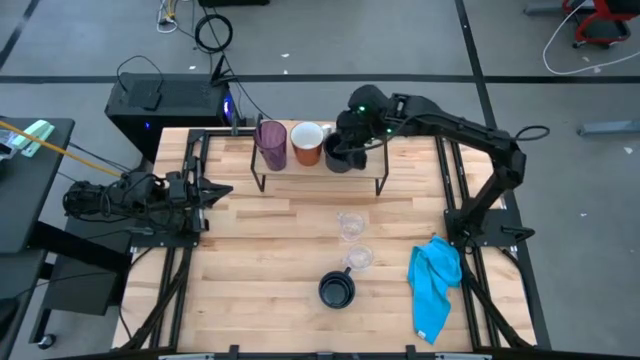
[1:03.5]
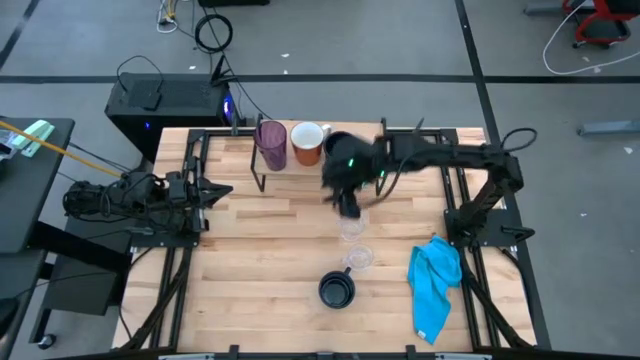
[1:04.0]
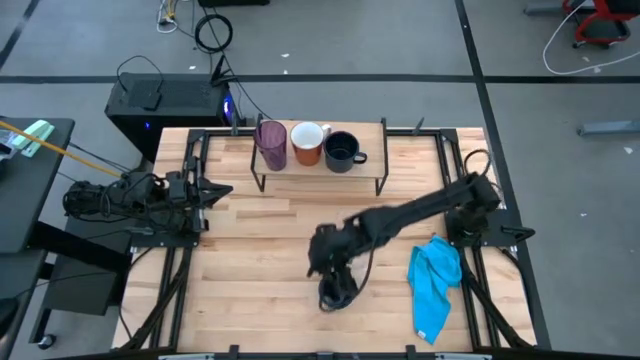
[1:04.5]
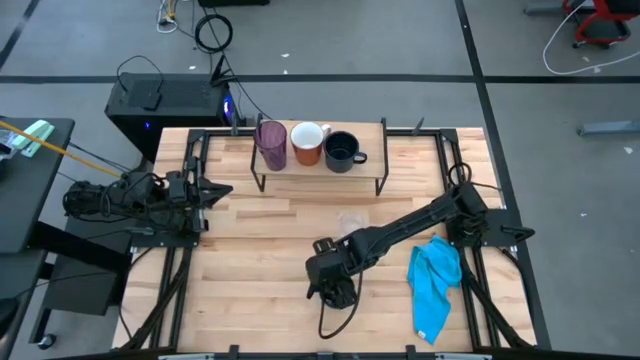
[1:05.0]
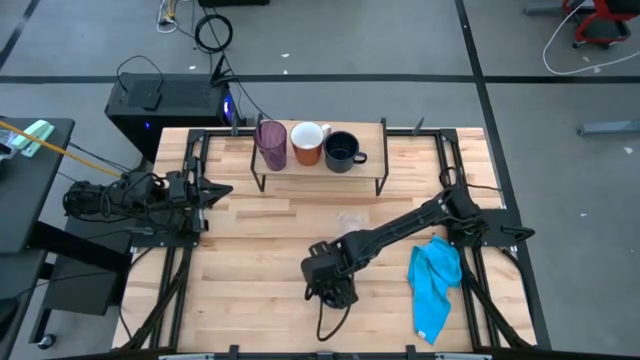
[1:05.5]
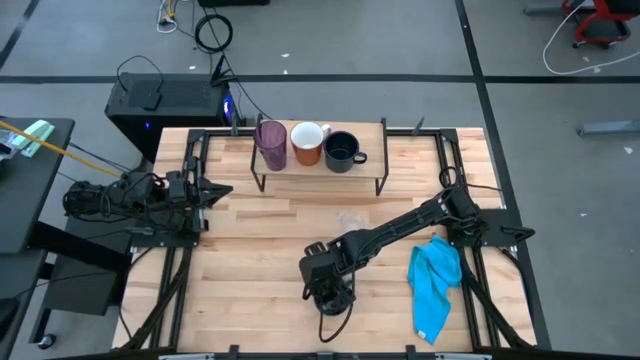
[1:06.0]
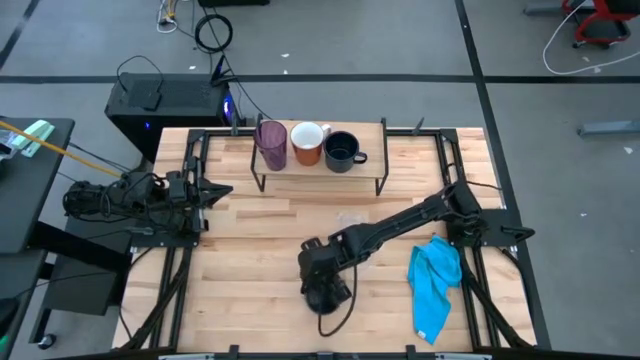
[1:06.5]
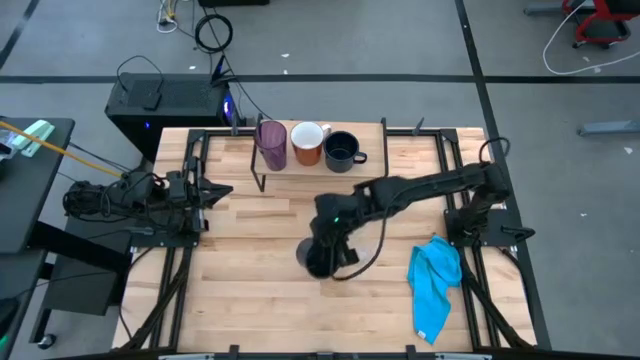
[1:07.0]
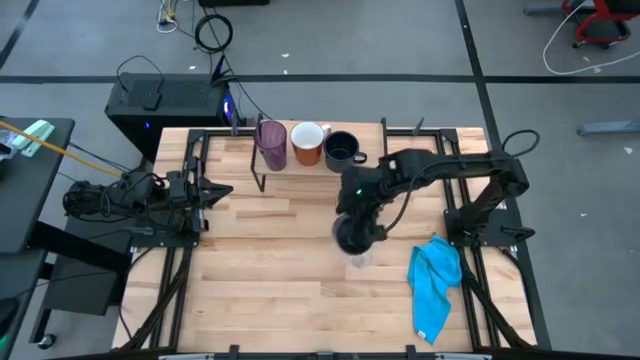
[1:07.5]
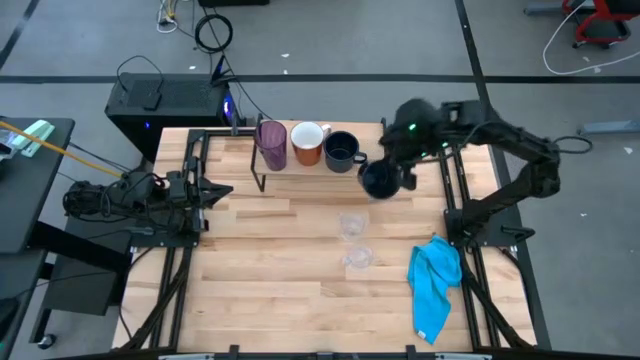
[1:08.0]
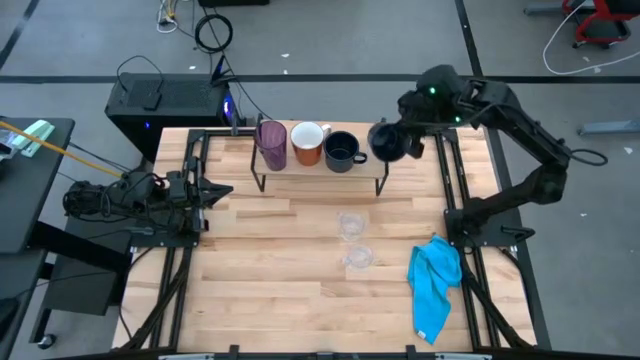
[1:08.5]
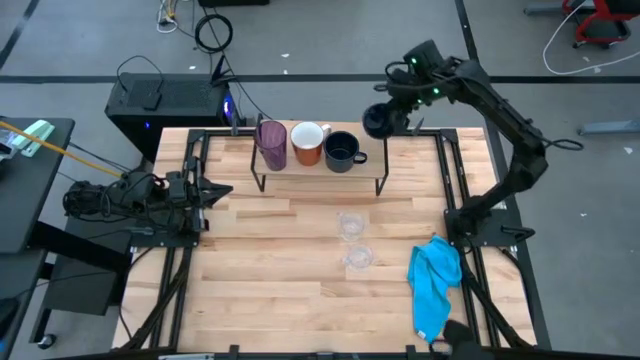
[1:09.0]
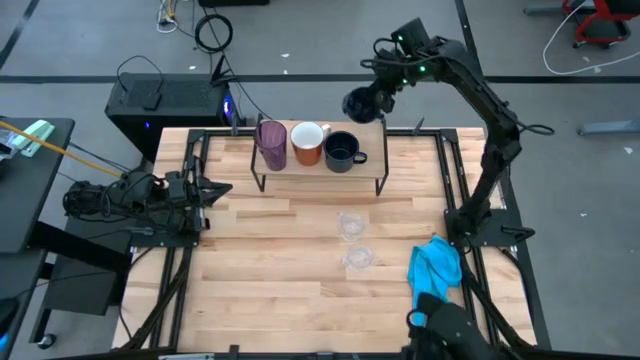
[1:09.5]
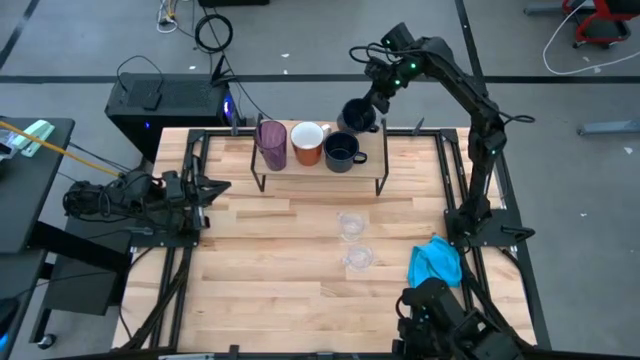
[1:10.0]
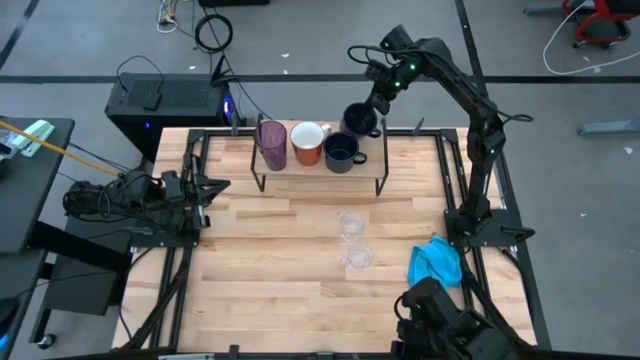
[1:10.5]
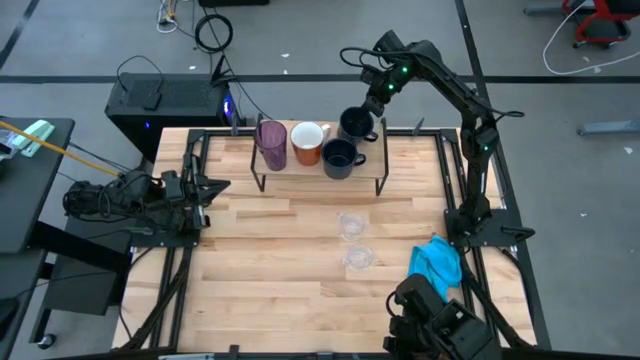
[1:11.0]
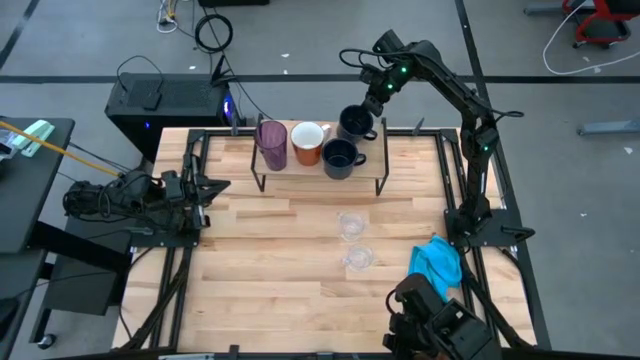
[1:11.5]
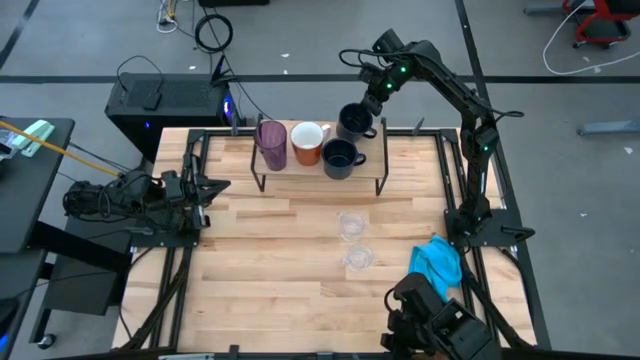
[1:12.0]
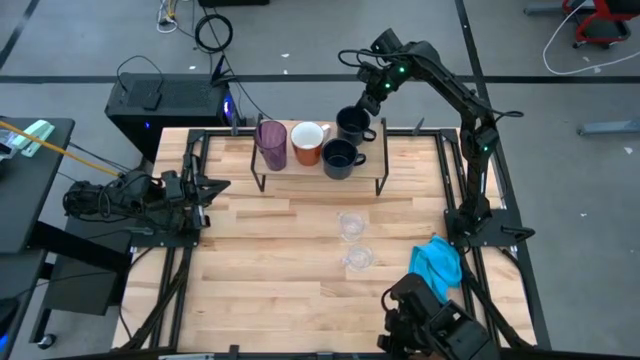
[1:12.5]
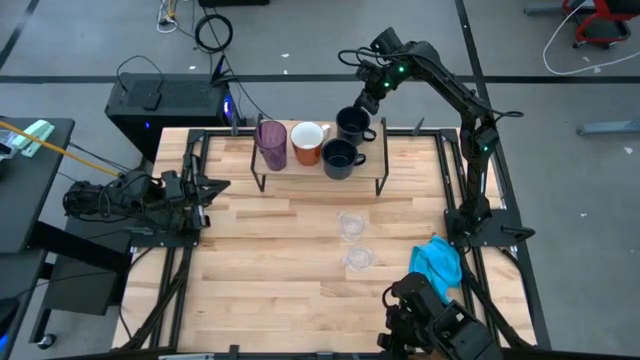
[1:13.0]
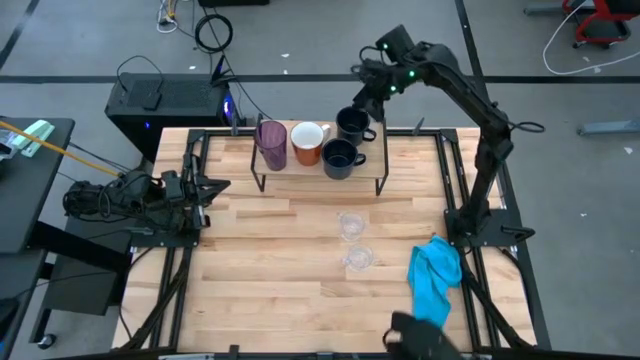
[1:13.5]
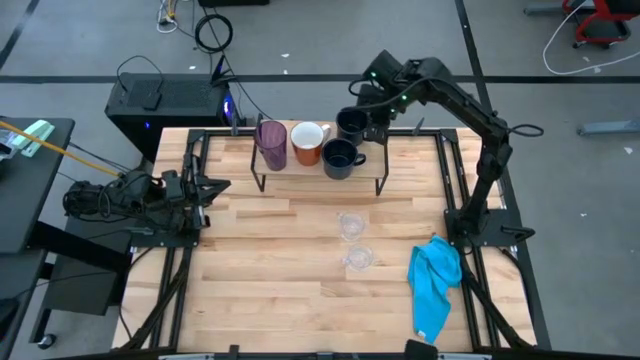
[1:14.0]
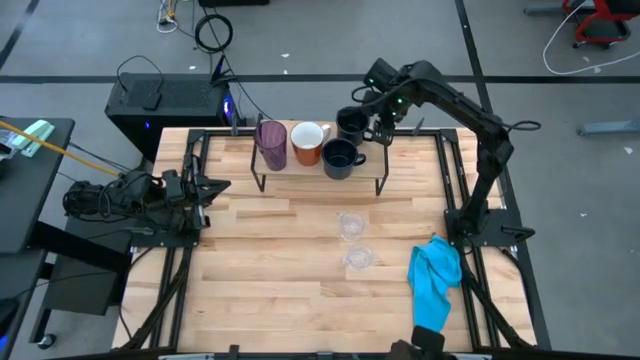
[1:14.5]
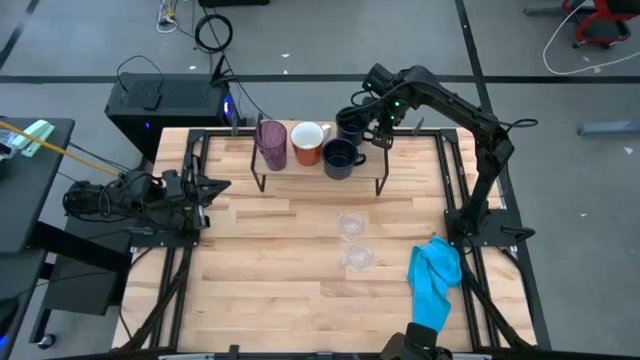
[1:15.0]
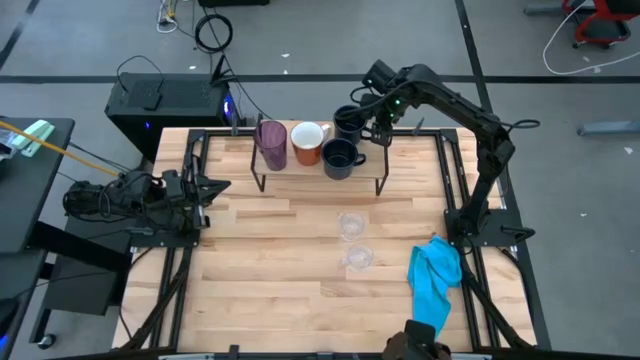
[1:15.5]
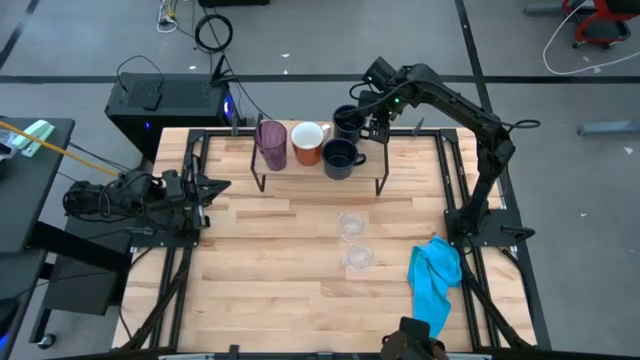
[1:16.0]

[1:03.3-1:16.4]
Task: Stack small to large cups/mugs on shelf
Align the dark blue mug with the other dark blue mug on the shelf

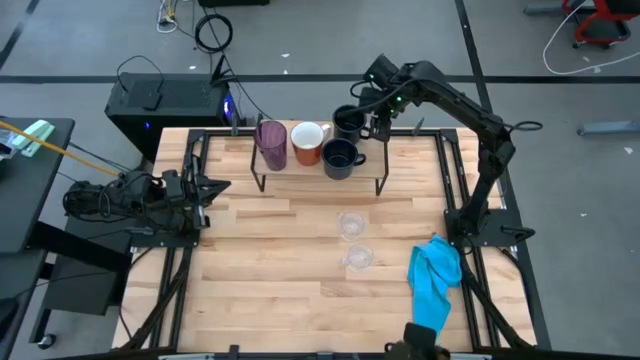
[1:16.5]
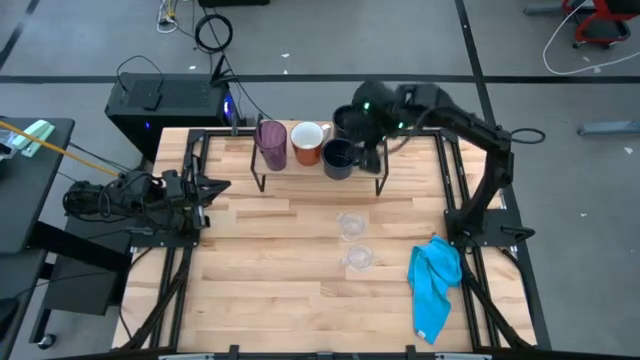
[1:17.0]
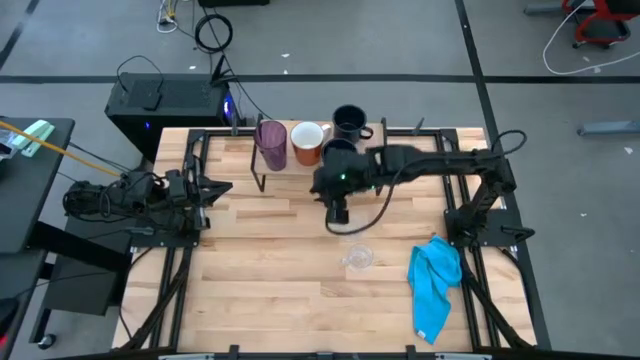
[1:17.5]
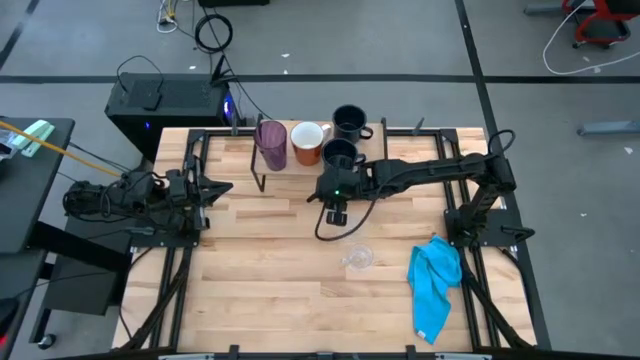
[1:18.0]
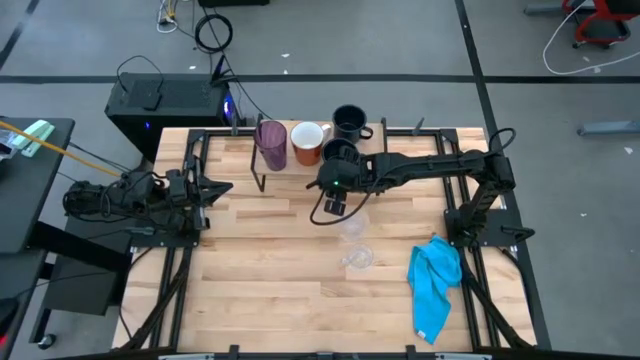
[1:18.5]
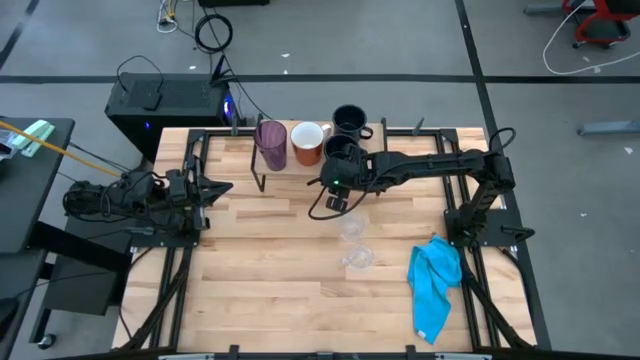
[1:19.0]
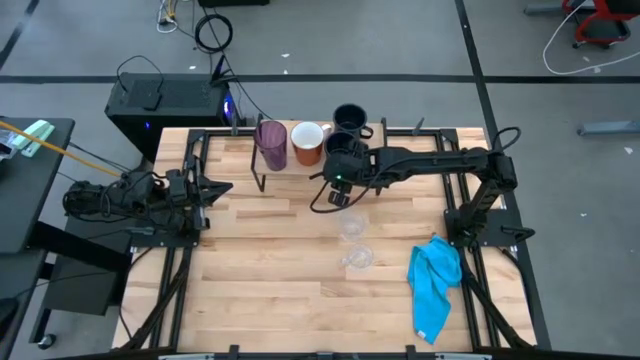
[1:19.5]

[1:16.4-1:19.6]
Adjust the dark blue mug on the shelf
